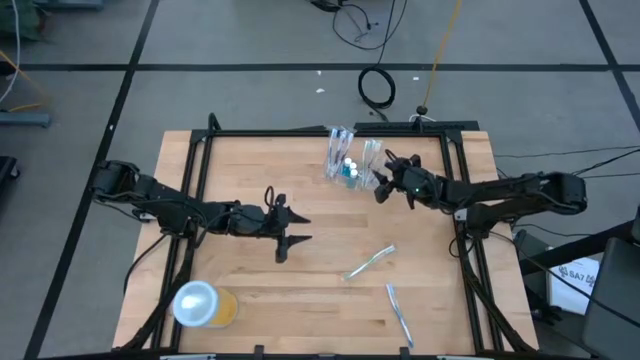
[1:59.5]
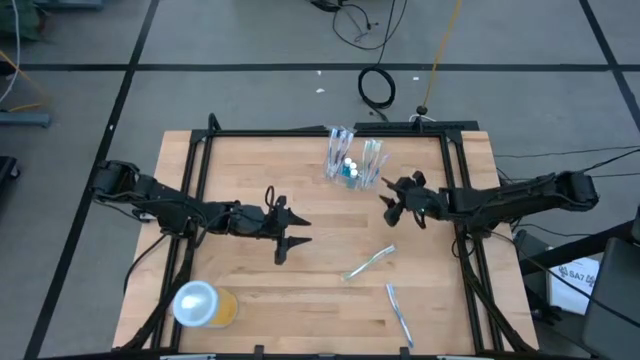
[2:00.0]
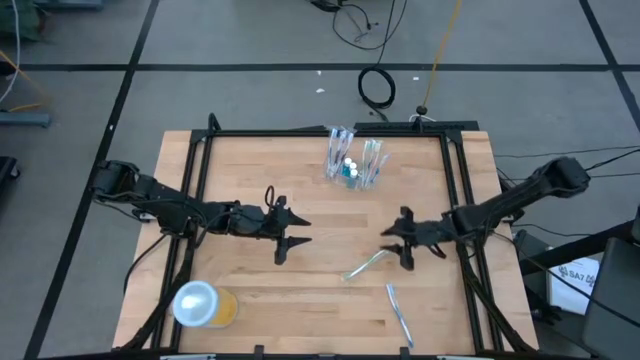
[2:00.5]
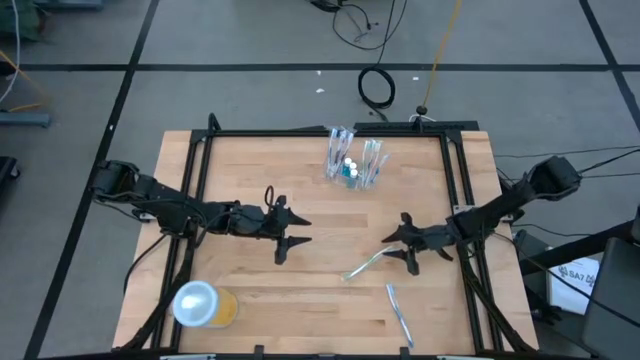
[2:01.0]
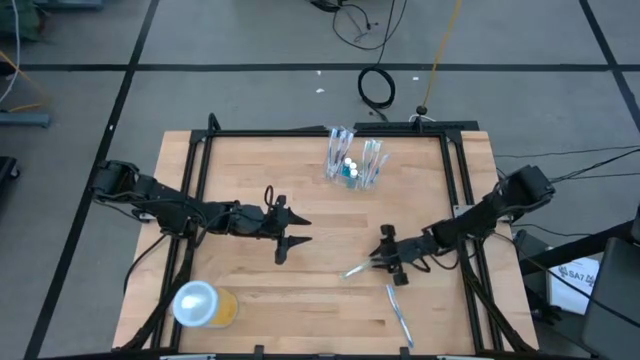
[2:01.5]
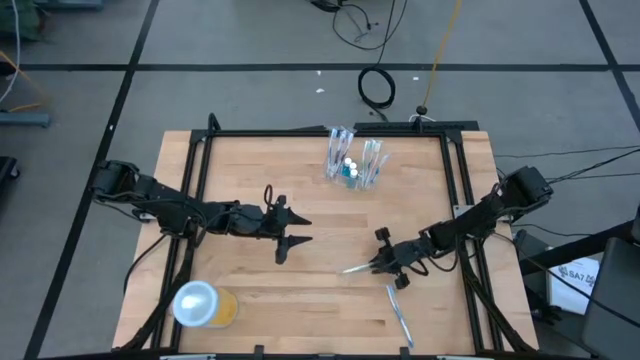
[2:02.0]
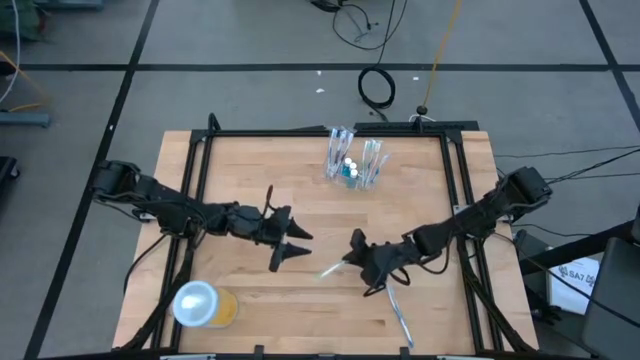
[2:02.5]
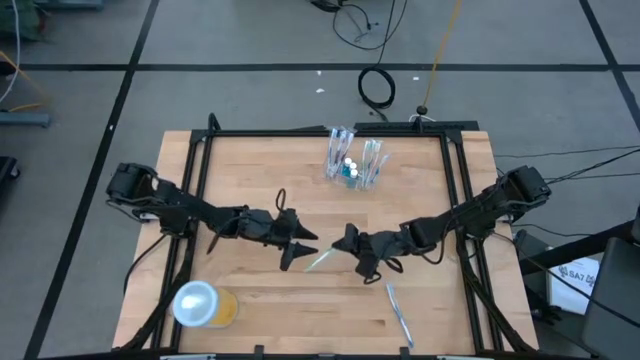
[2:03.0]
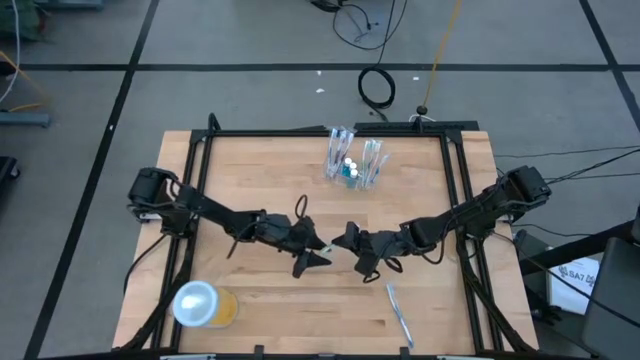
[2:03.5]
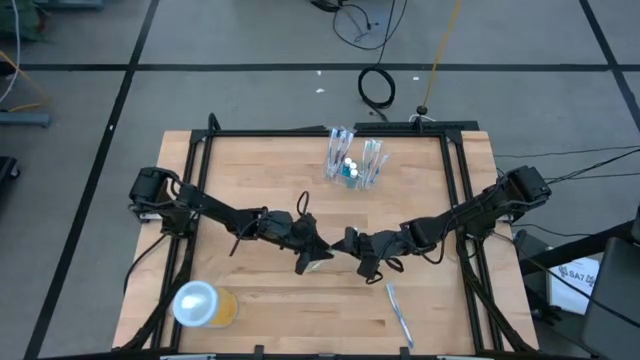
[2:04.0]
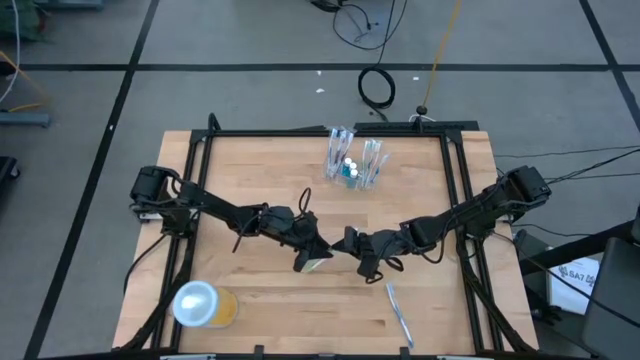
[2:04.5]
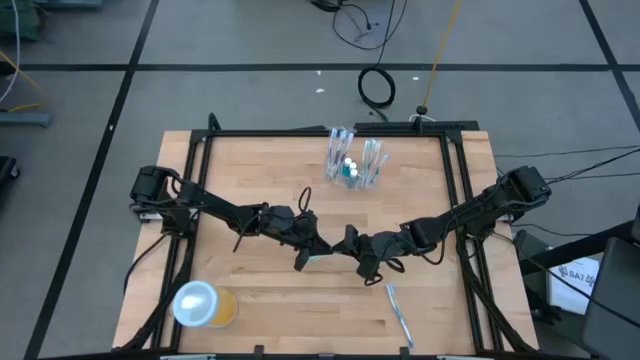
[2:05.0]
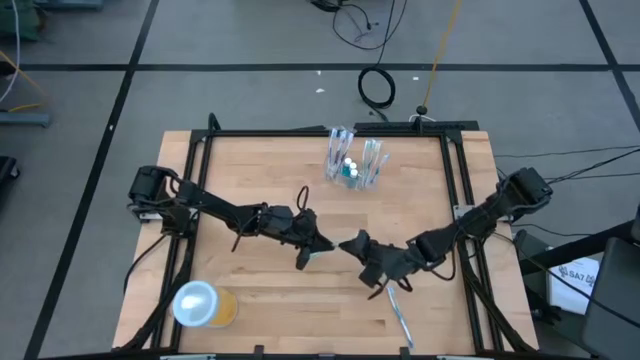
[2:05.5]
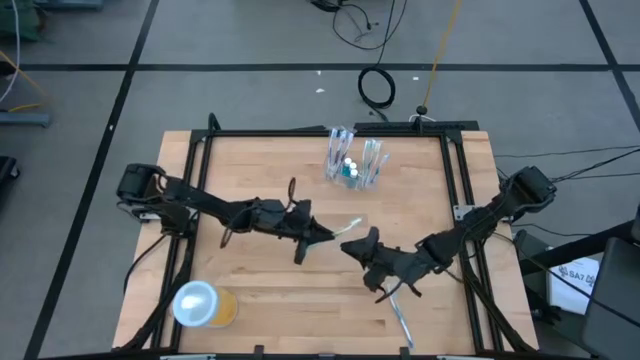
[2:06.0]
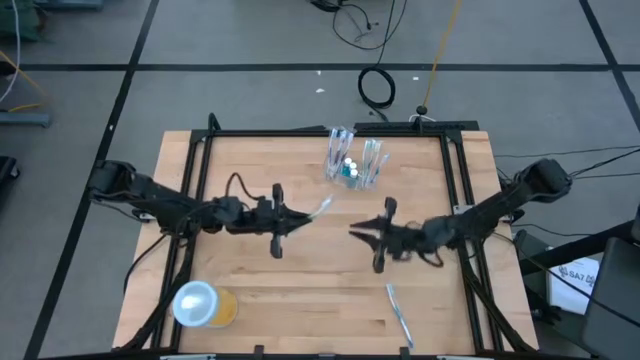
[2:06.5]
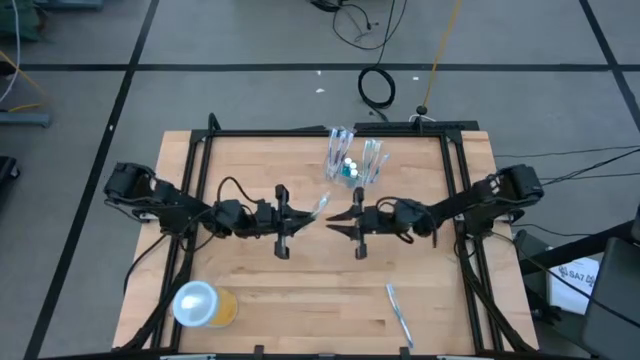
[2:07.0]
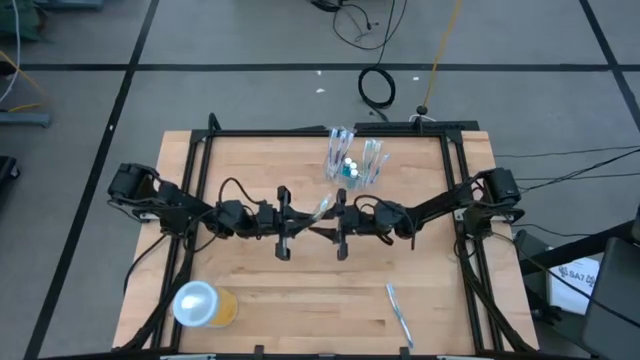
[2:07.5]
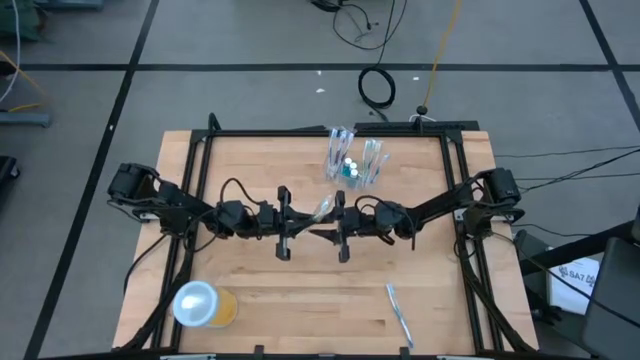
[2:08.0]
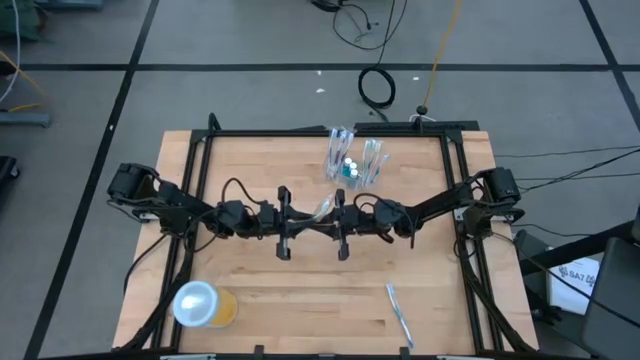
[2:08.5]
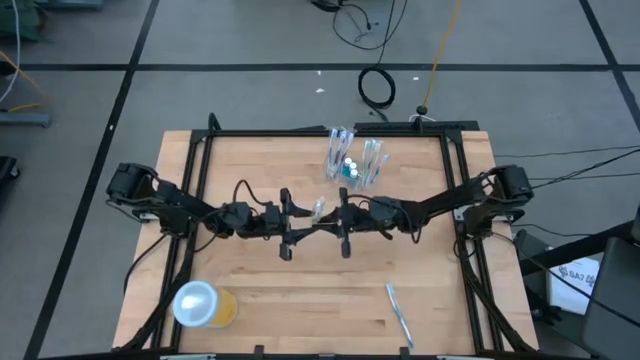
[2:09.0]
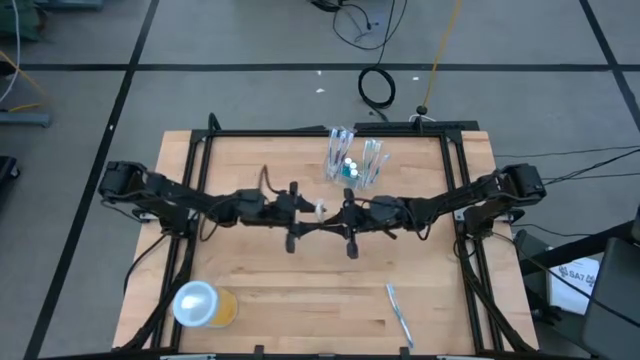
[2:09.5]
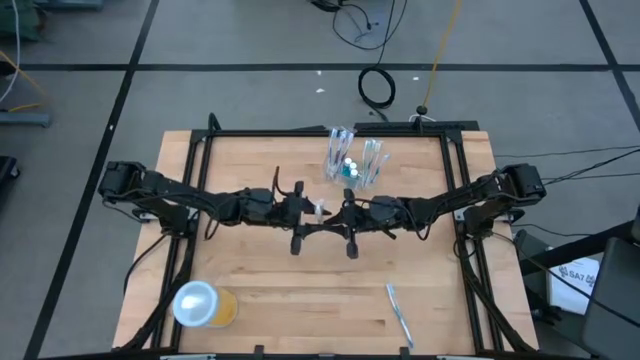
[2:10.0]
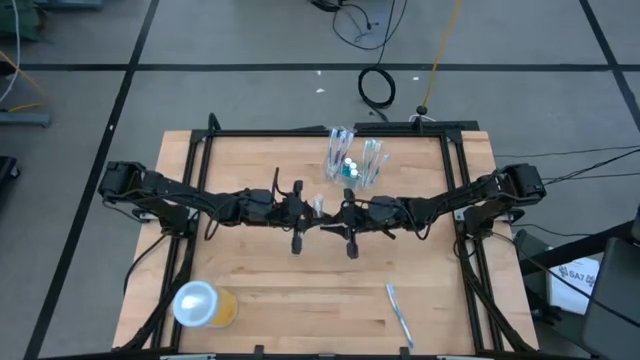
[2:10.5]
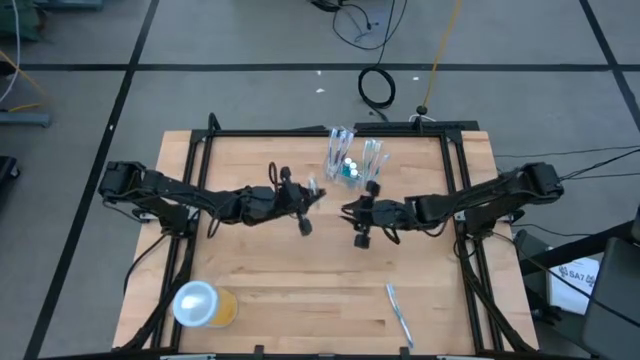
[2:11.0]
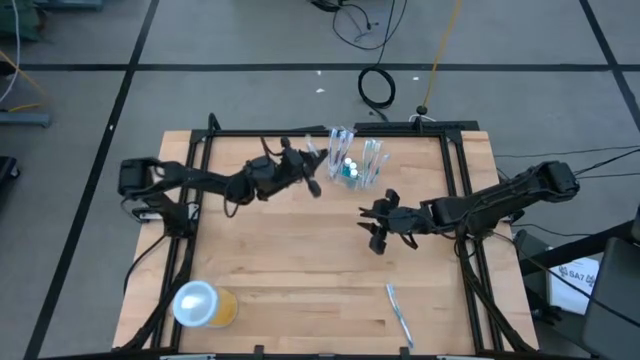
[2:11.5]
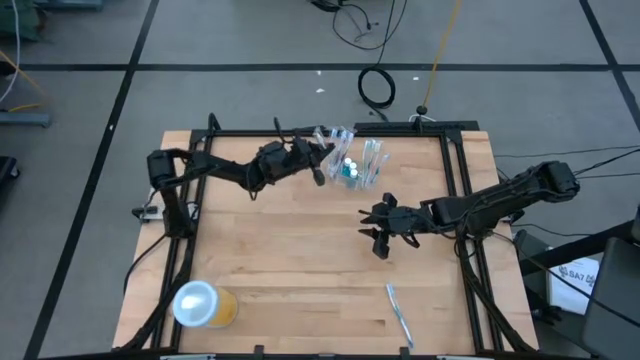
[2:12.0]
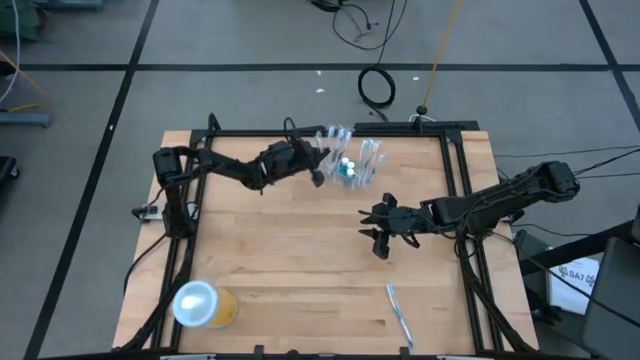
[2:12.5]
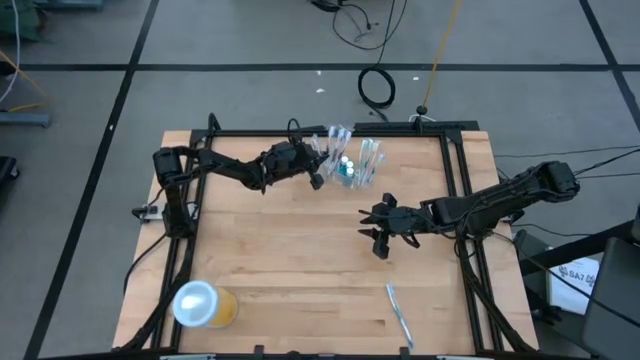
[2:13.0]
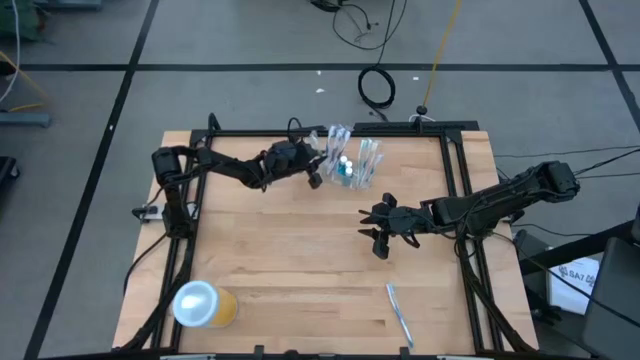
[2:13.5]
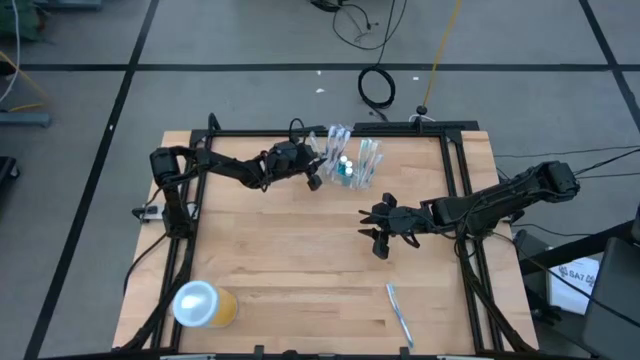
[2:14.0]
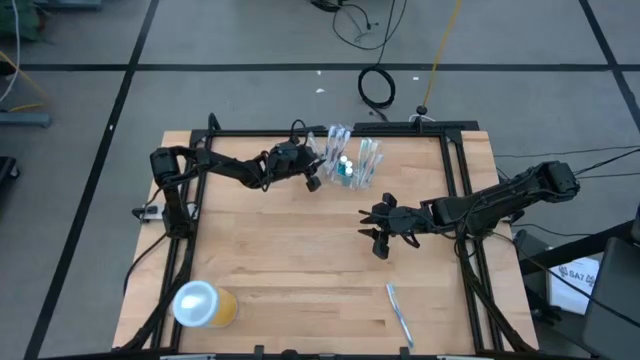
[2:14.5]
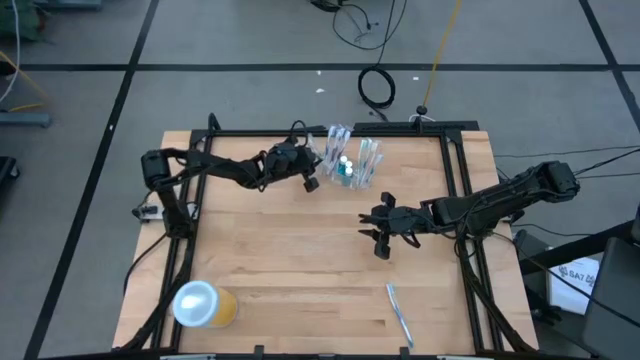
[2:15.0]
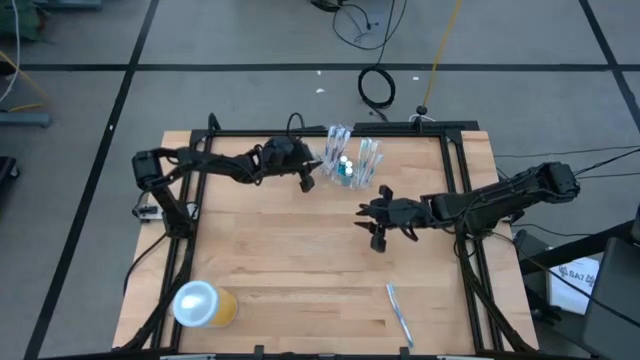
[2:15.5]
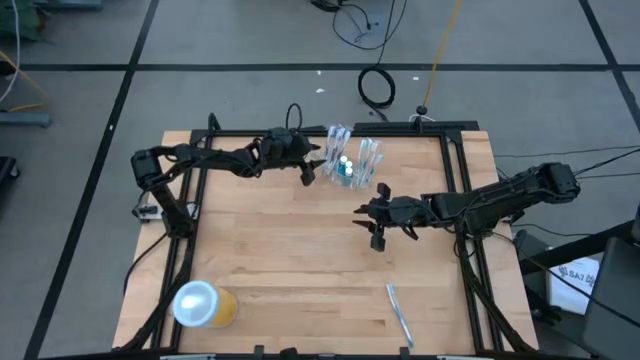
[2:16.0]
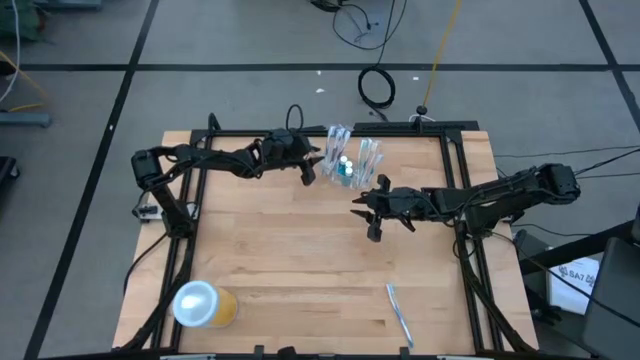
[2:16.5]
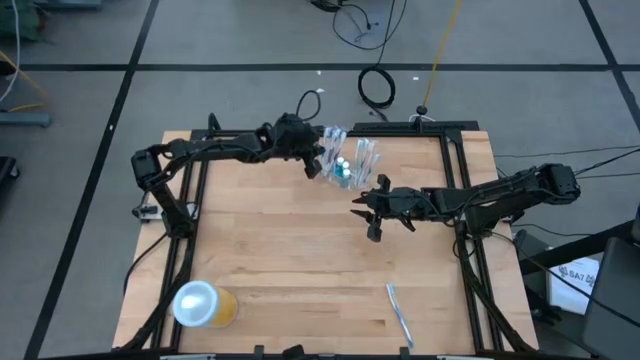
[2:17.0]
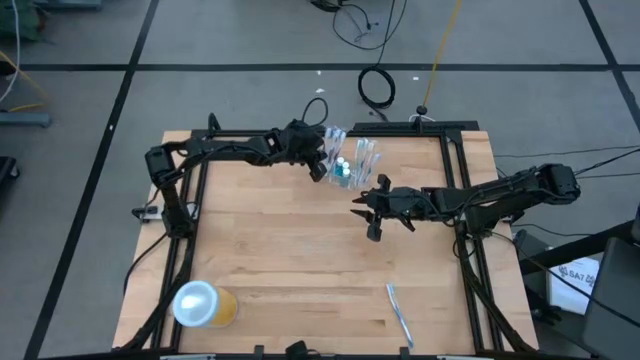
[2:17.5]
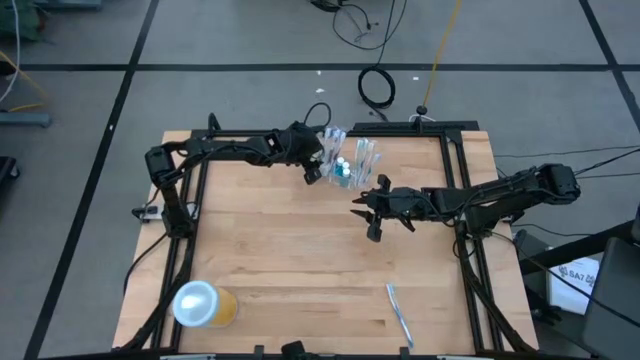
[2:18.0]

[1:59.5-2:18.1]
Task: Pick & Place toothbrushing station
Put the green toothbrush into the transparent organizer
